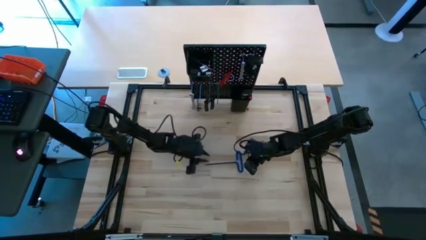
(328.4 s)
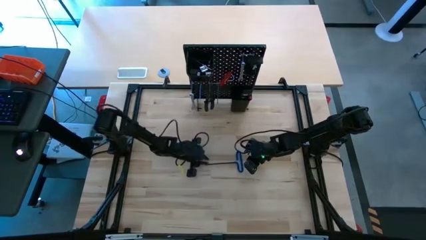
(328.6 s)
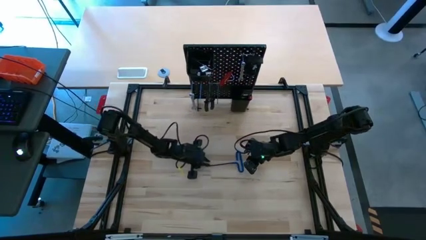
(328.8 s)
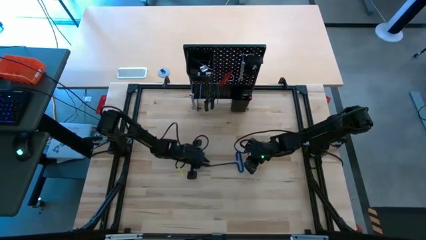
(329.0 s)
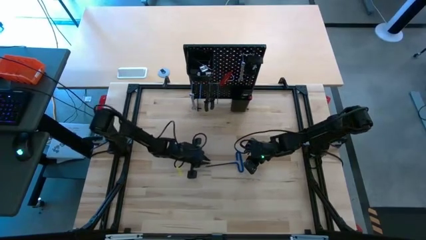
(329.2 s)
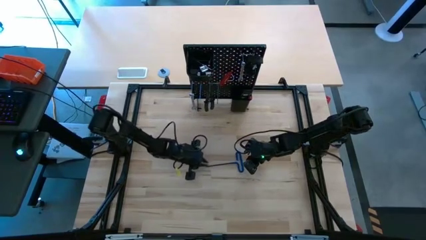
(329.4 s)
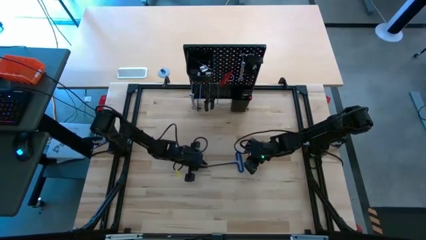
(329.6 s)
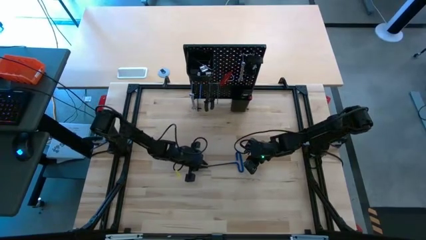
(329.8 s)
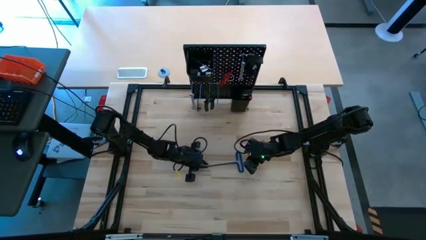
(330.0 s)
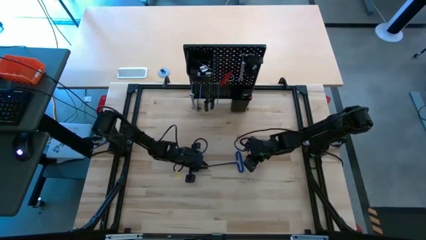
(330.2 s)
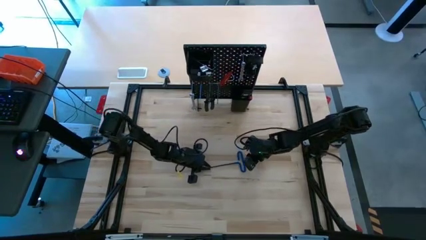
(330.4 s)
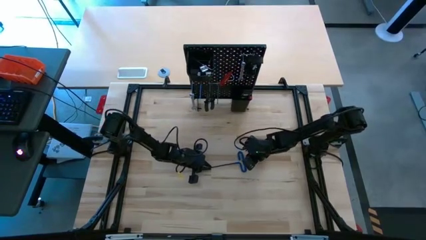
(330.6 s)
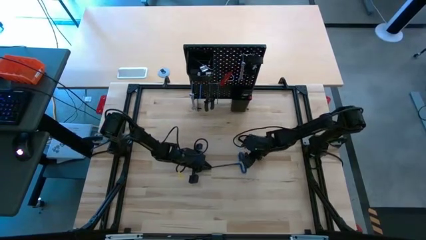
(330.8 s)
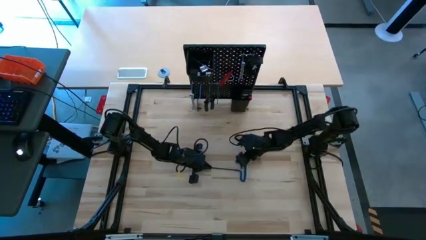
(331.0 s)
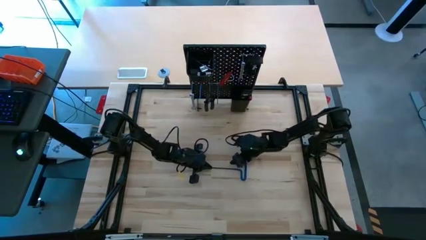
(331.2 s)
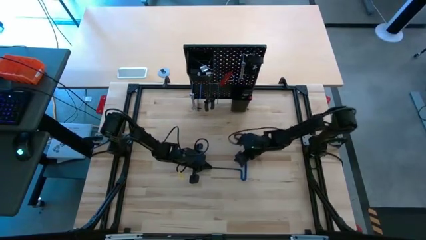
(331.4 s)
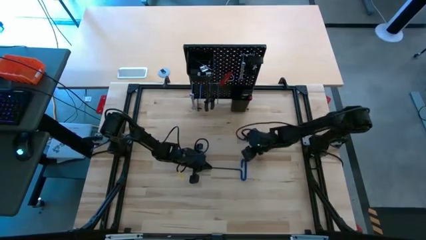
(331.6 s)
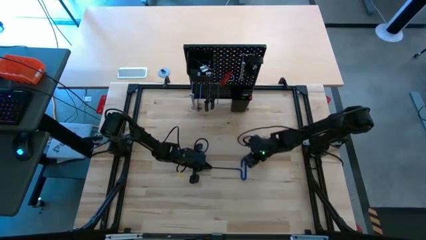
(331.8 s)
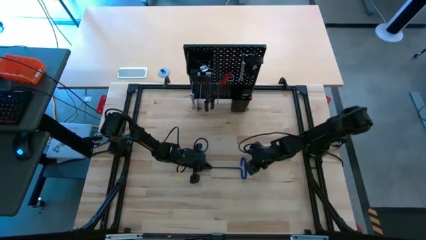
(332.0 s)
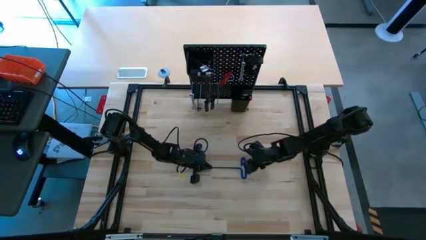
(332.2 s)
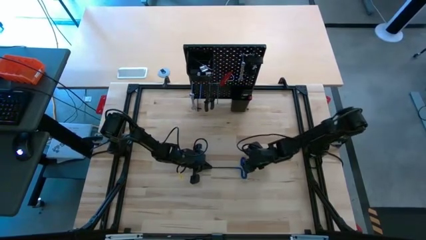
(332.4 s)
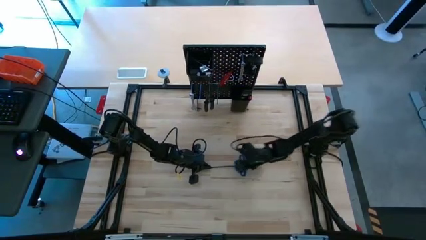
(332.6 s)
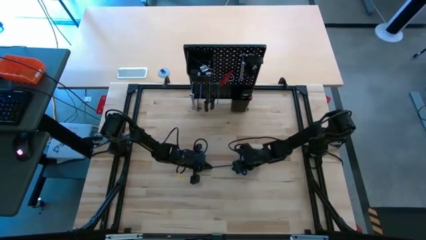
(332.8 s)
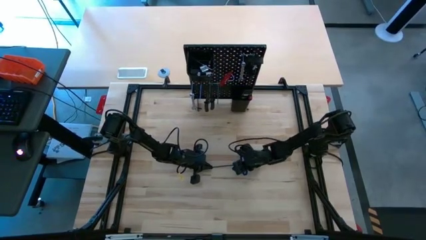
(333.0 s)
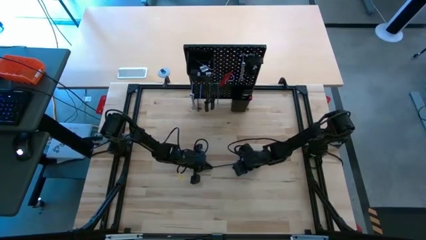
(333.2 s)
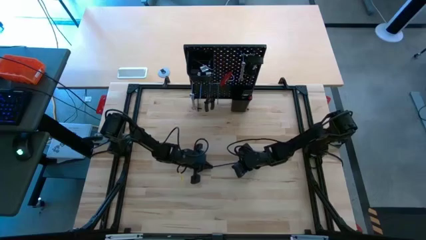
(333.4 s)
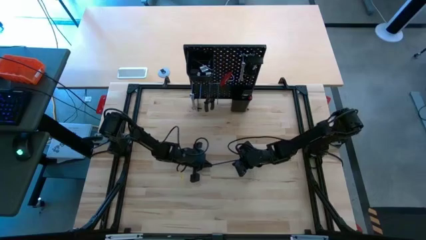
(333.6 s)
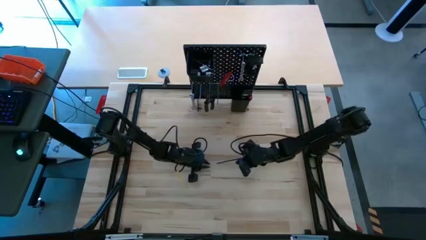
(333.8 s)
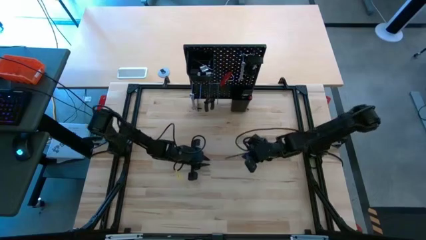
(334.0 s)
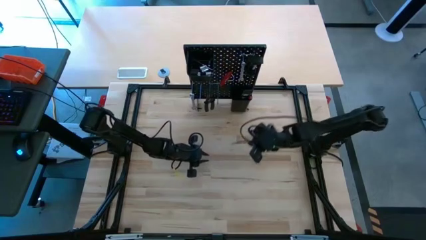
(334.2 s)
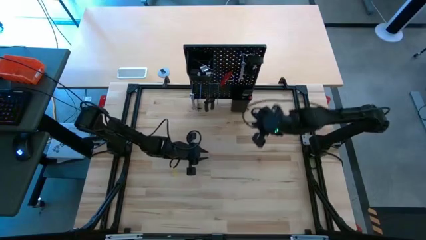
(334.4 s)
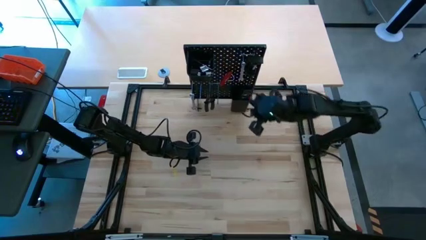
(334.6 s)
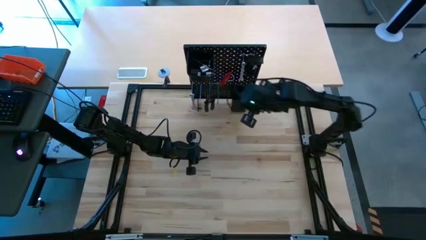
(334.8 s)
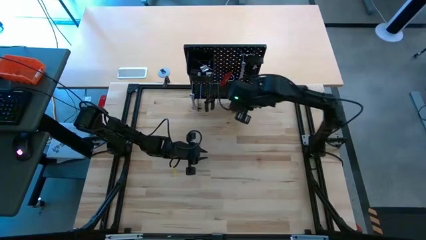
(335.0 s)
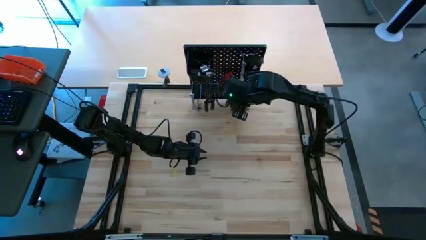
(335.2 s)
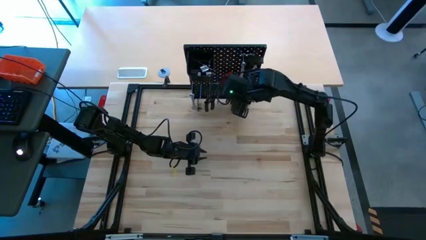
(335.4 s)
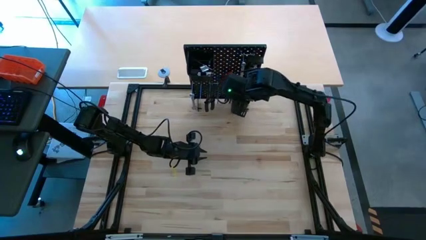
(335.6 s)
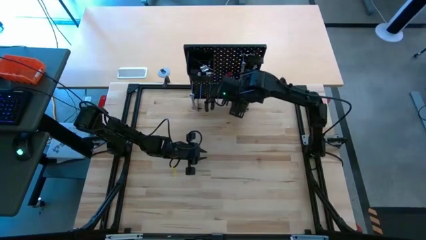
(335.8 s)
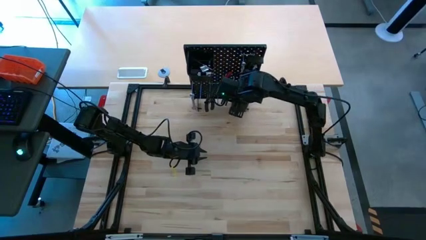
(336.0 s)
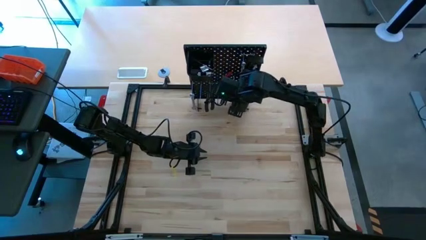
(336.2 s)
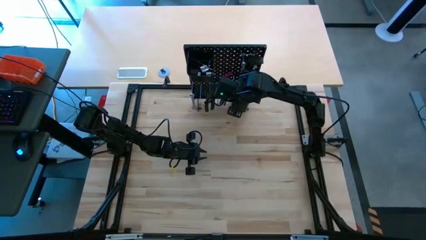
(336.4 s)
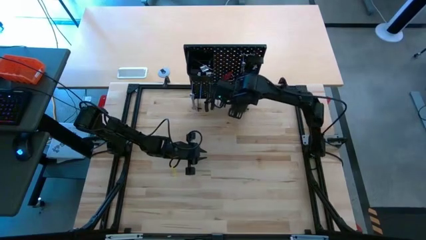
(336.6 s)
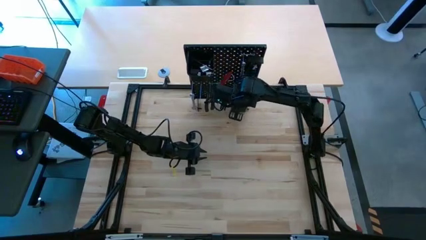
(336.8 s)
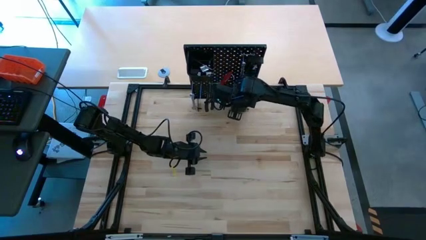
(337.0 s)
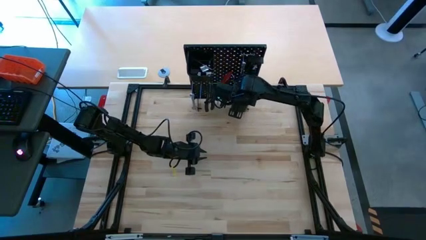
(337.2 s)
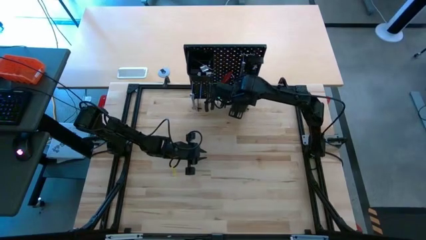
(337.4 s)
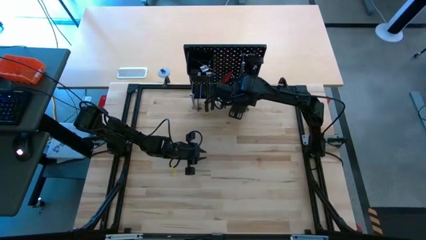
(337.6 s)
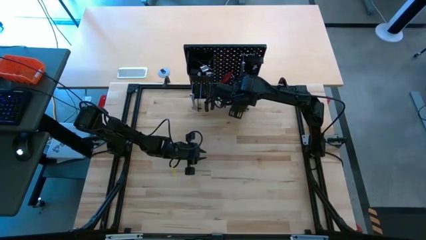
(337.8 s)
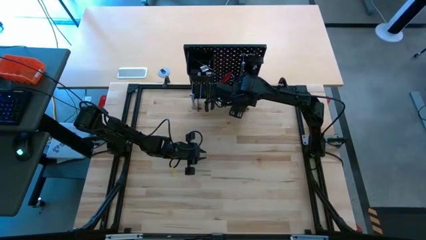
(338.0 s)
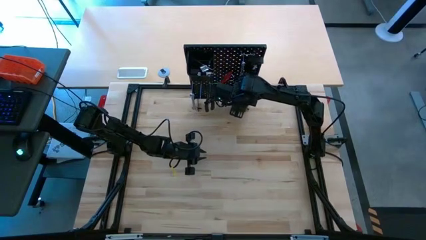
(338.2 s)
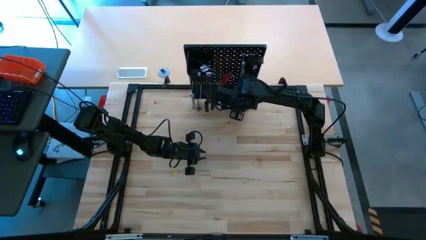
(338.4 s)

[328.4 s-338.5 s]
Task: Hang tools onto peg board
Put the pick tool into the bottom bin on the pegboard
